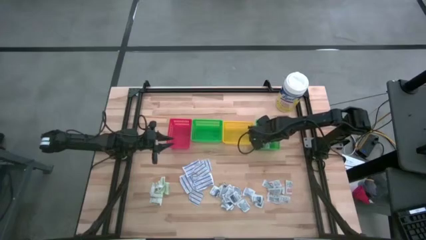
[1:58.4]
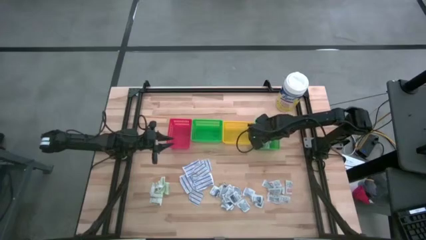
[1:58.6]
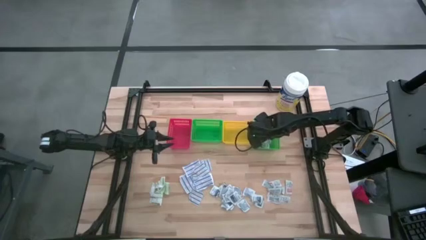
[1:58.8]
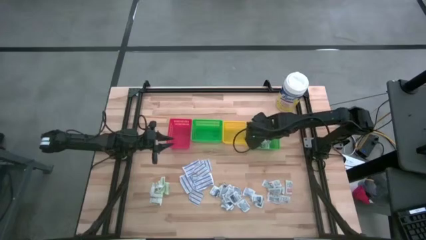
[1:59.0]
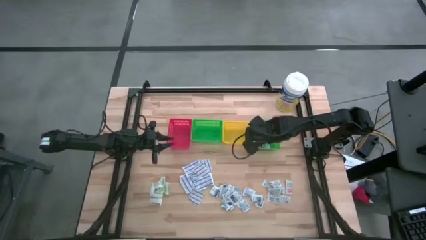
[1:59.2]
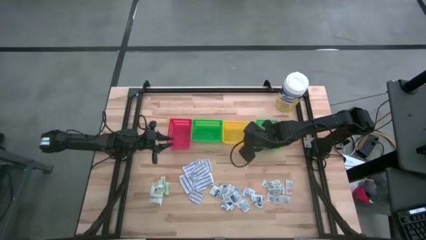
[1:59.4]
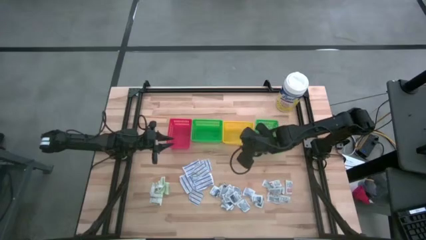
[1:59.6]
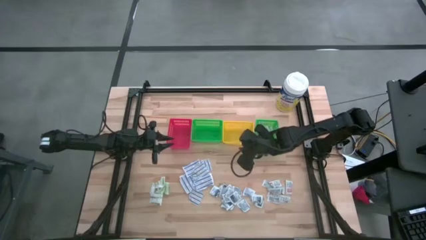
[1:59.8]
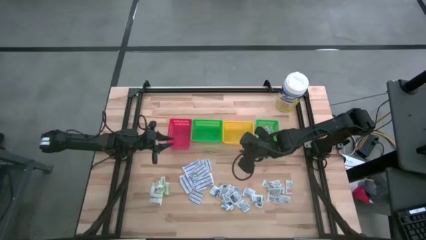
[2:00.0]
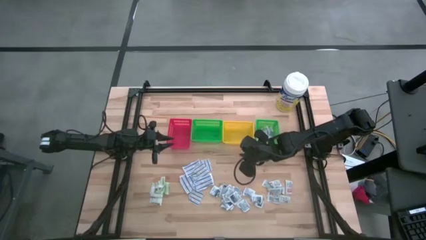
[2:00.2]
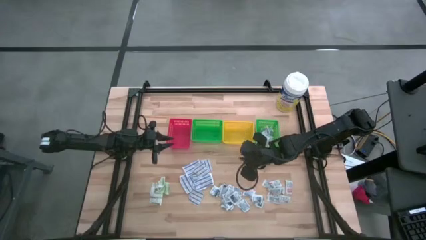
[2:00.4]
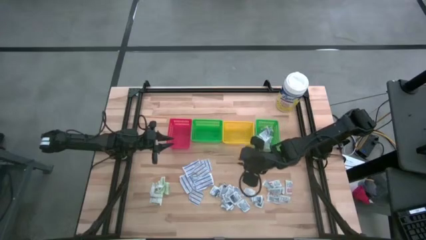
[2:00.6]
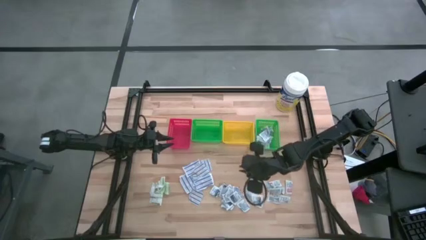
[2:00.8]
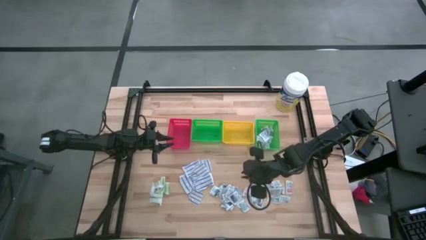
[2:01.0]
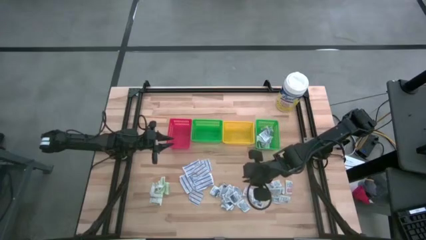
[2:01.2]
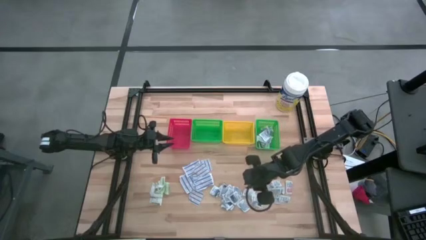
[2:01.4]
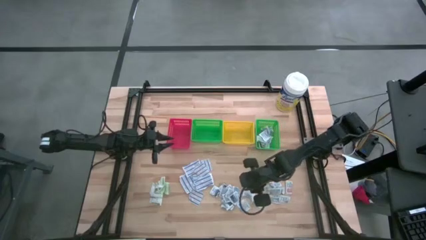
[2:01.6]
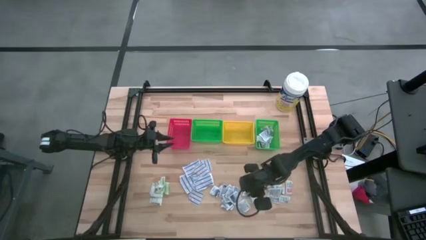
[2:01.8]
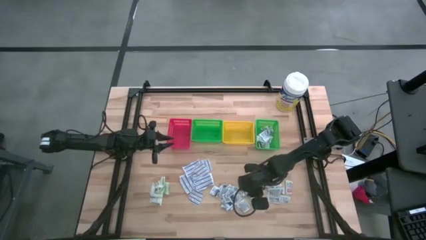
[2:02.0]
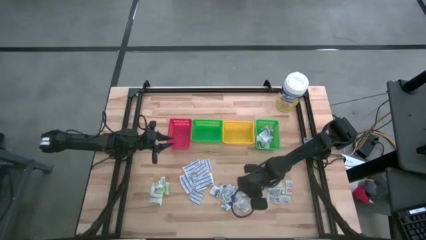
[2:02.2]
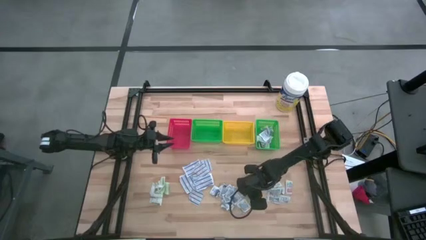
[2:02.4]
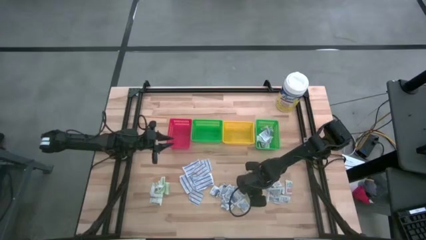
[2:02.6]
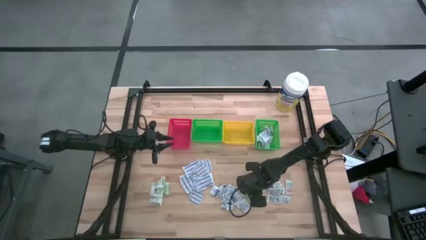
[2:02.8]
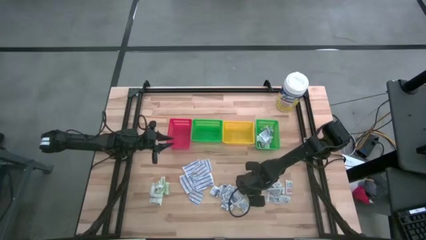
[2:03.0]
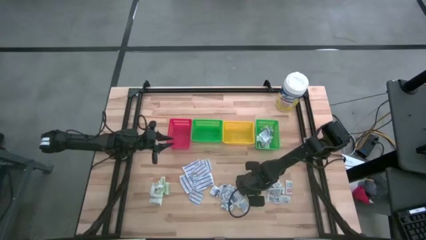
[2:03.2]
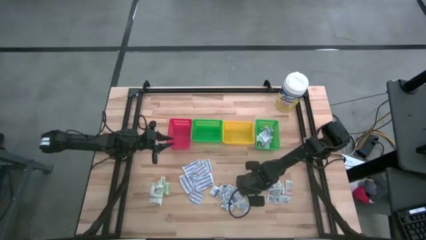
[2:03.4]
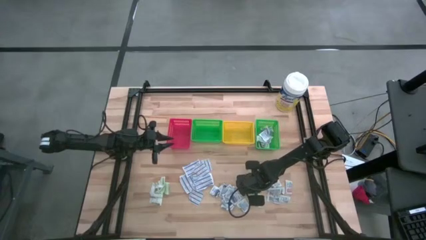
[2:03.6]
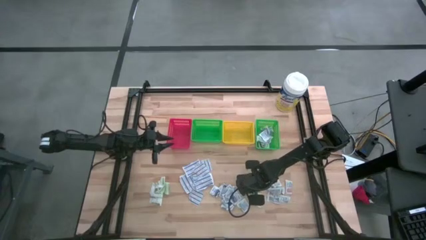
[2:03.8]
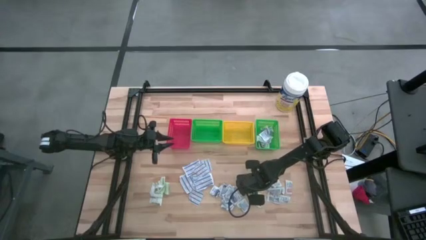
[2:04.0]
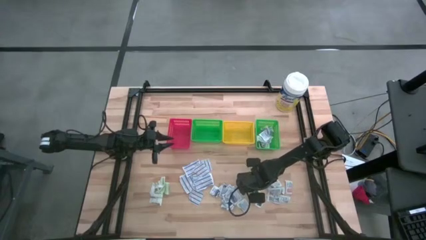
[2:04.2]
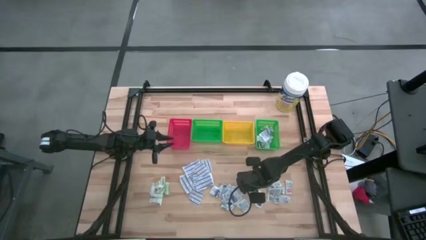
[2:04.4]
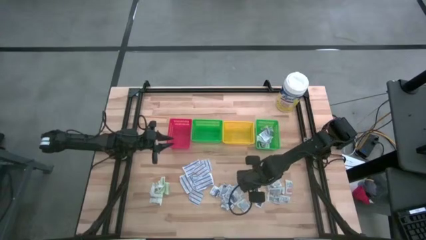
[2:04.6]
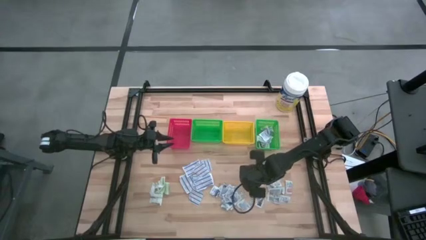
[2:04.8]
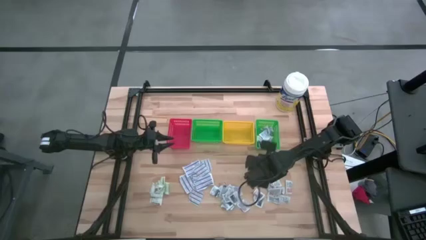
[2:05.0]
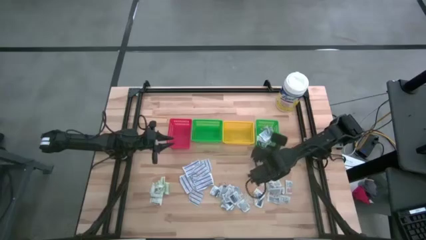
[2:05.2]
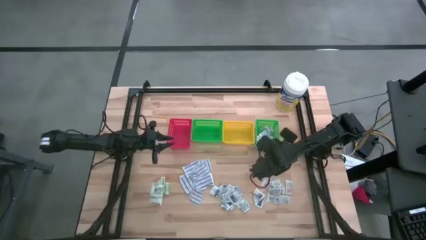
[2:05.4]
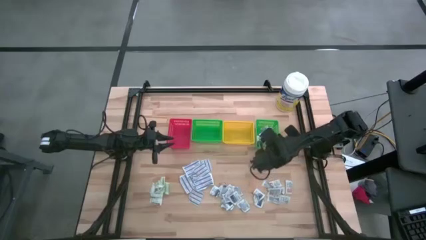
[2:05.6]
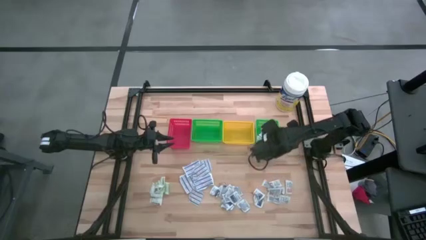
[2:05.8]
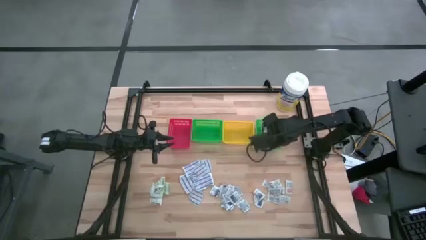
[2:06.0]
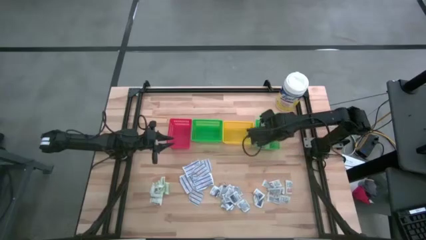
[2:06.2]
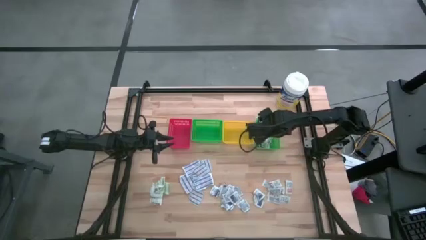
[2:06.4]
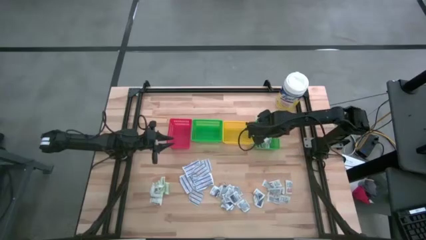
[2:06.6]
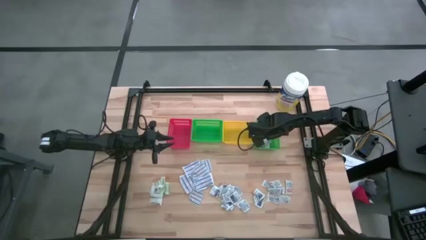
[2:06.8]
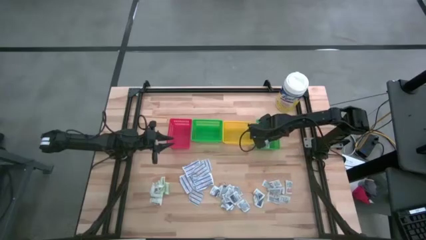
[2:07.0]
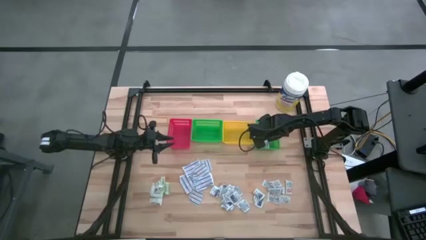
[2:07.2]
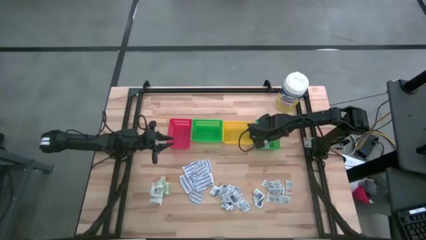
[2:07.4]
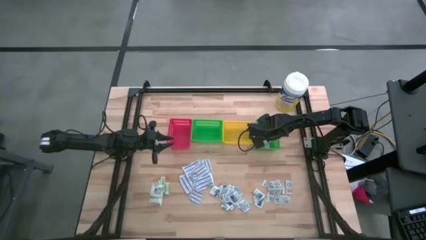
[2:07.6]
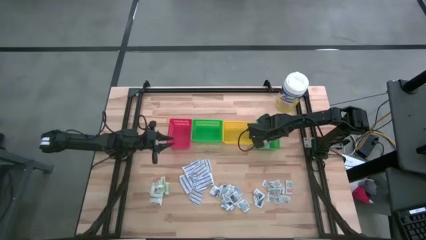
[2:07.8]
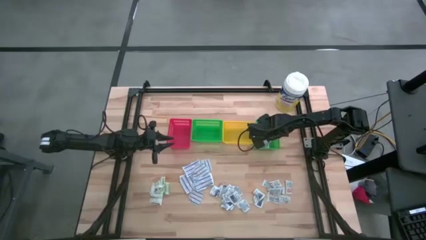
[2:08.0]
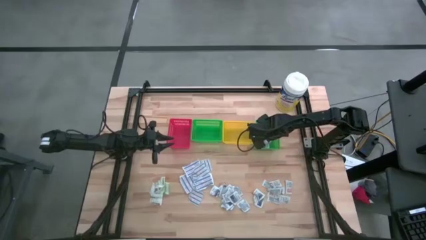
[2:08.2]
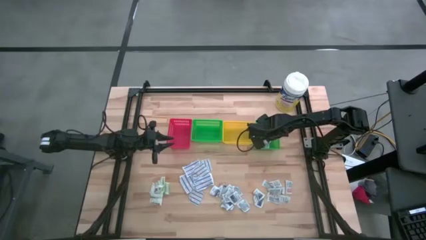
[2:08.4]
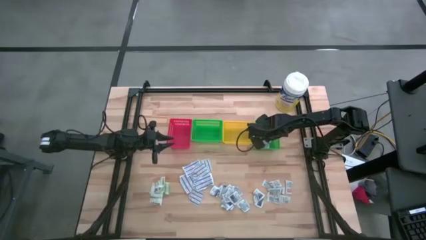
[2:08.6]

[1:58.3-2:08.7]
Task: Pick & Place First Aid Supplies
Put the blue alcohol pad into the right green bin

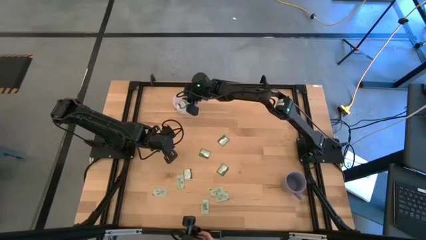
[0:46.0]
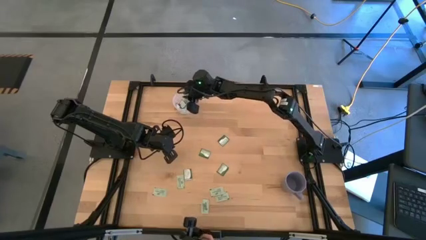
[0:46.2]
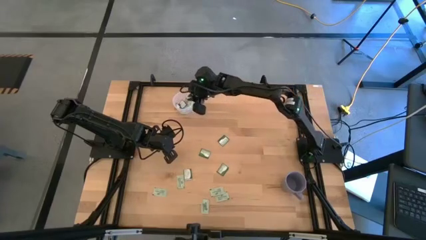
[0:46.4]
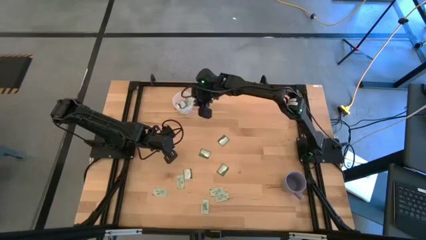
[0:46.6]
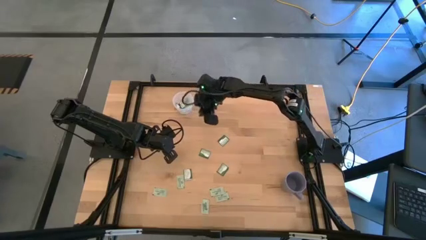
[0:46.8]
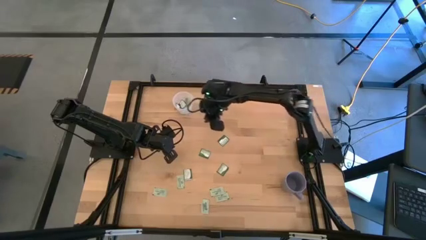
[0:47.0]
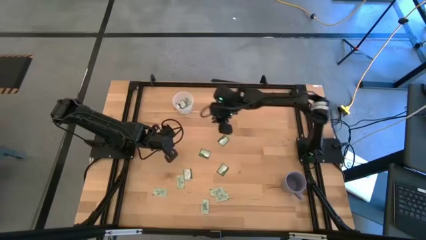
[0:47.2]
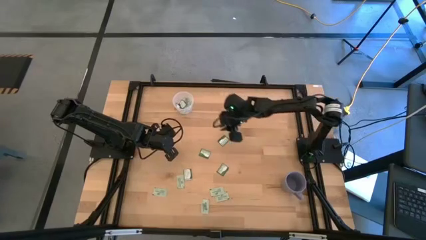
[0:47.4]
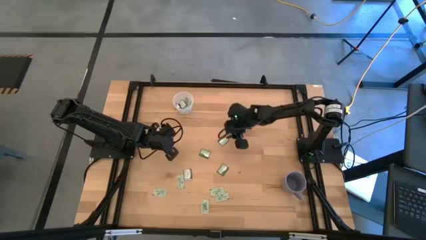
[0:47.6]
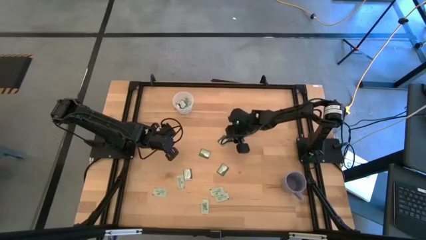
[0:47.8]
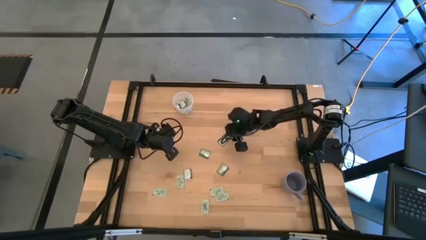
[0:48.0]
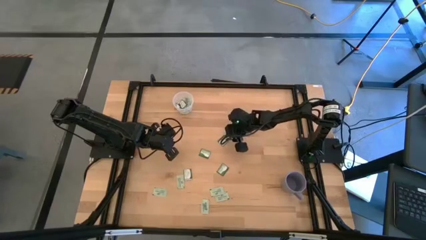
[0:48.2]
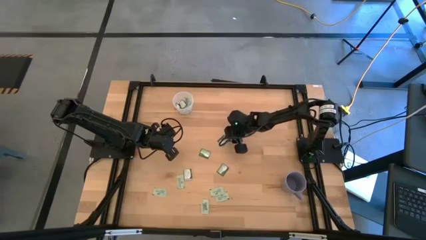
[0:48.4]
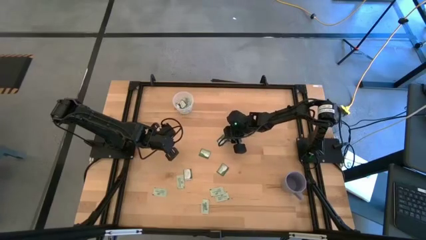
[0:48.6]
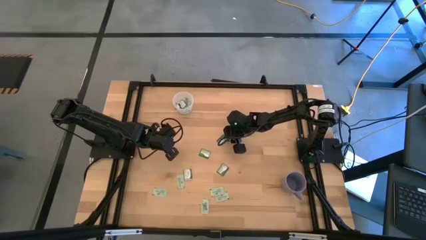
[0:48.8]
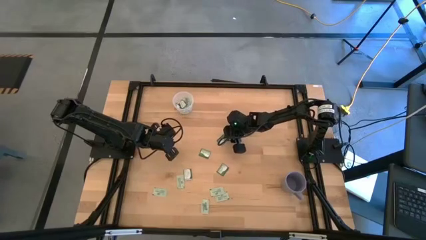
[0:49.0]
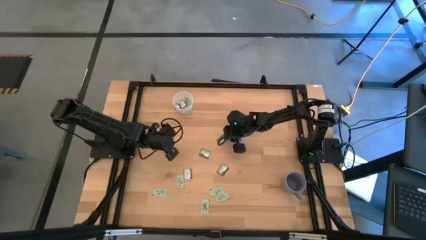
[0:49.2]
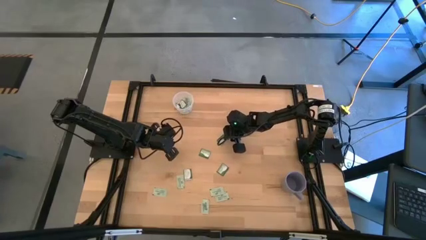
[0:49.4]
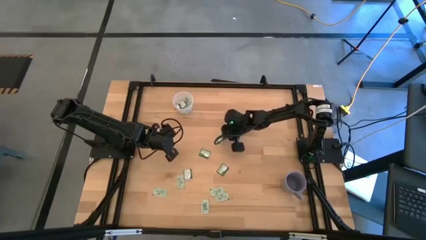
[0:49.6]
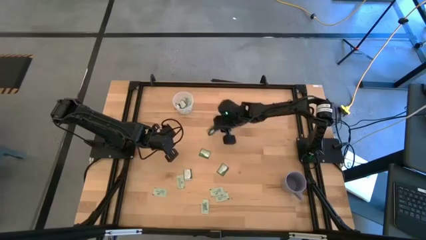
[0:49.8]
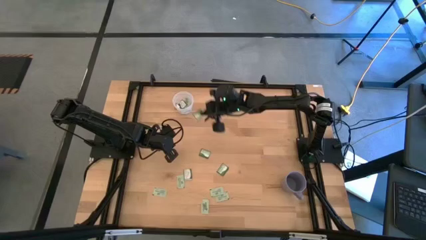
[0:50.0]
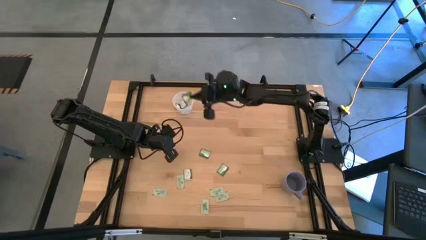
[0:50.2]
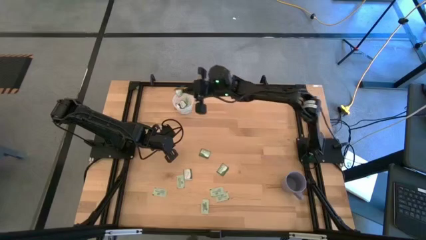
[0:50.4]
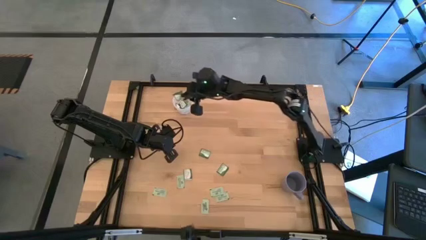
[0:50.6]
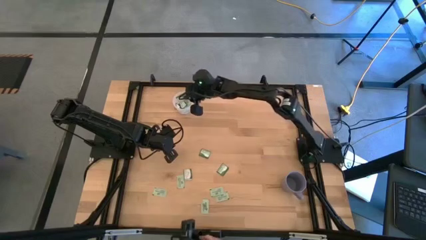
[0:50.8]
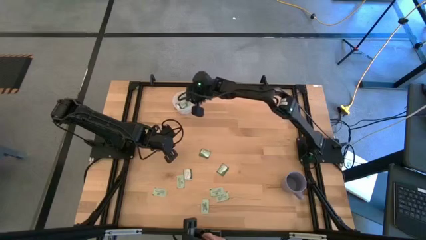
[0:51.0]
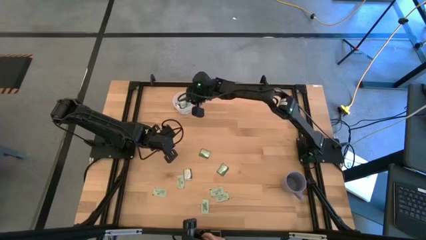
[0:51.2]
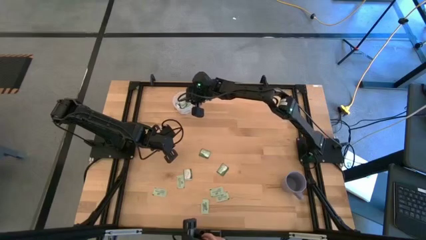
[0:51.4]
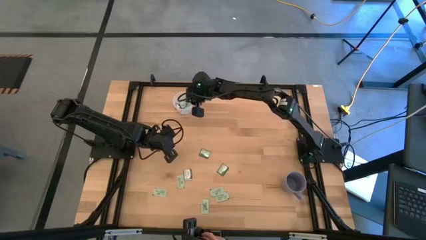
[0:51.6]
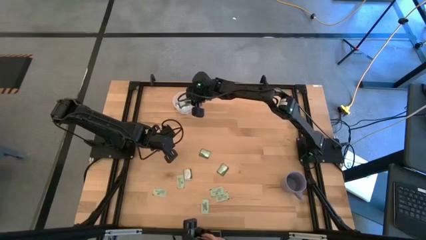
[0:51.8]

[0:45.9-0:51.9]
Task: Pick and place items into bin
Put the truvia packet into the transparent bin
